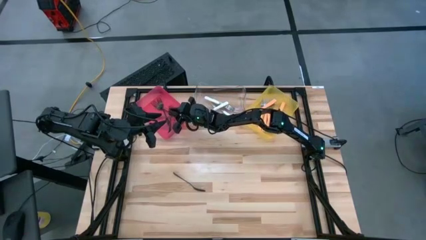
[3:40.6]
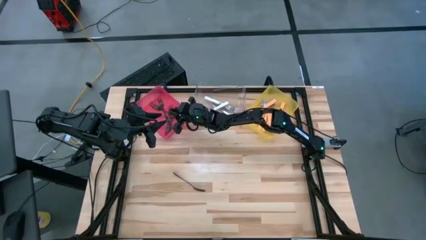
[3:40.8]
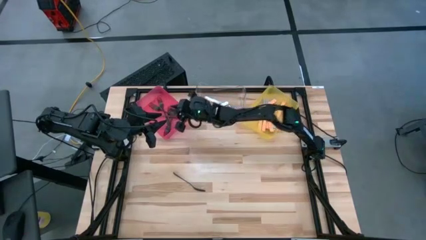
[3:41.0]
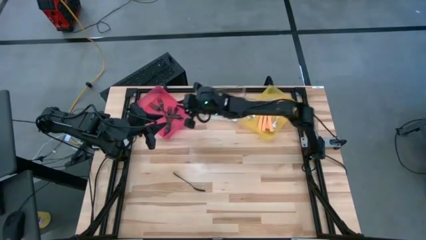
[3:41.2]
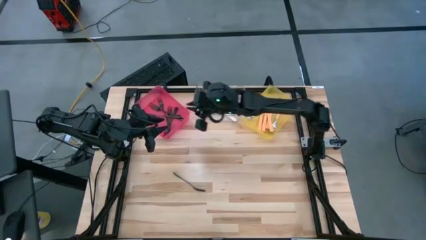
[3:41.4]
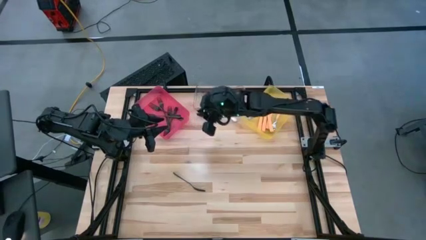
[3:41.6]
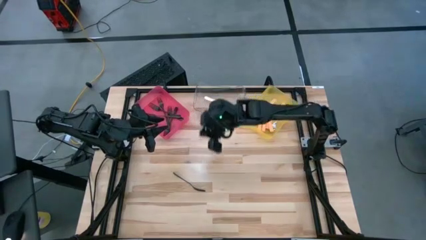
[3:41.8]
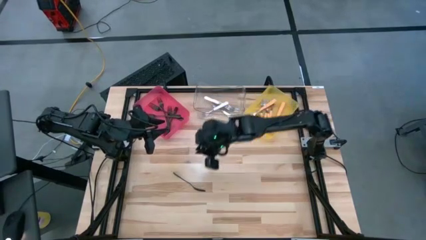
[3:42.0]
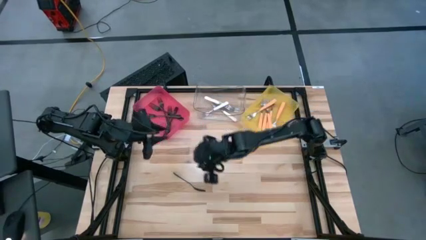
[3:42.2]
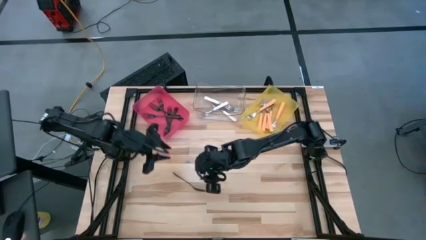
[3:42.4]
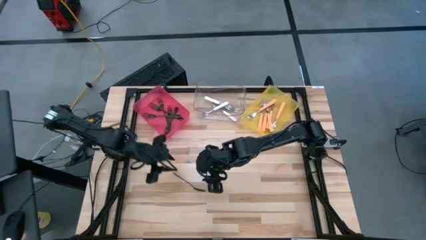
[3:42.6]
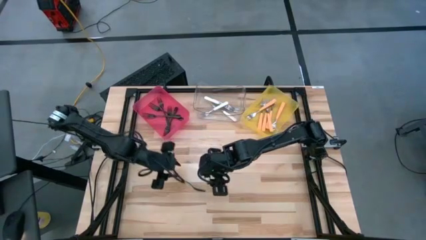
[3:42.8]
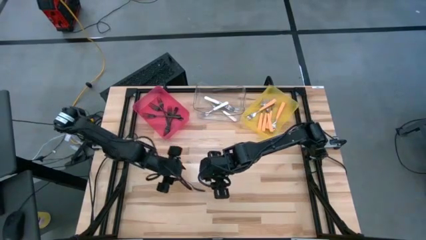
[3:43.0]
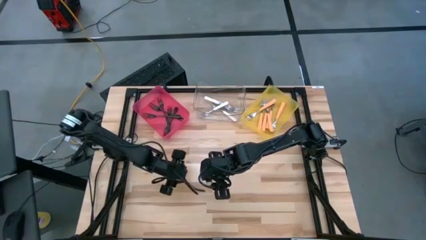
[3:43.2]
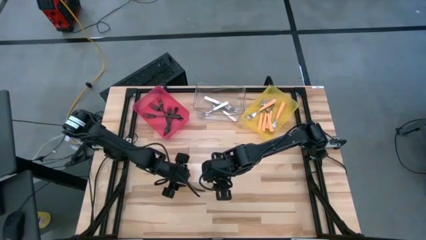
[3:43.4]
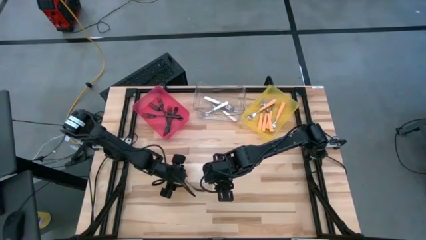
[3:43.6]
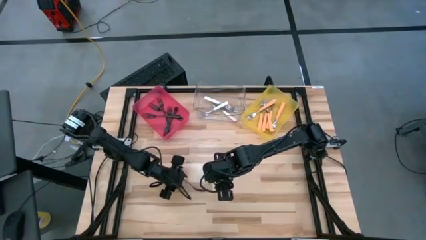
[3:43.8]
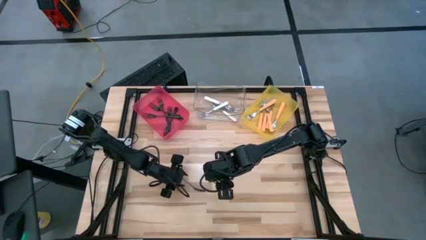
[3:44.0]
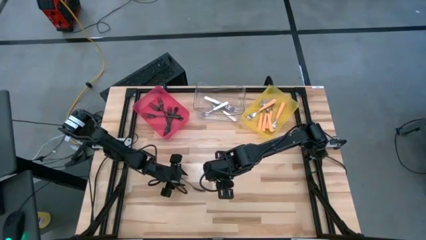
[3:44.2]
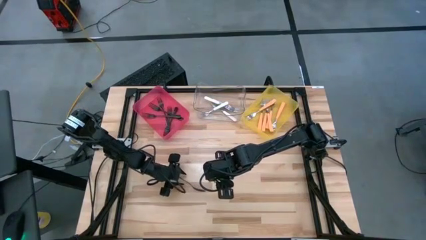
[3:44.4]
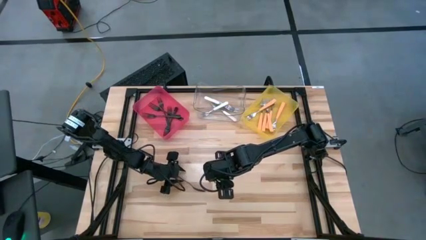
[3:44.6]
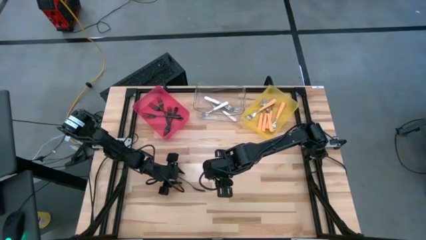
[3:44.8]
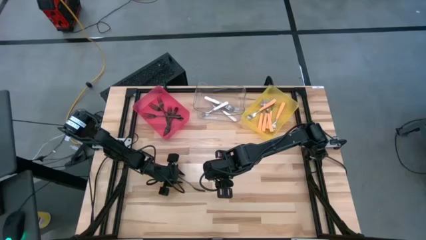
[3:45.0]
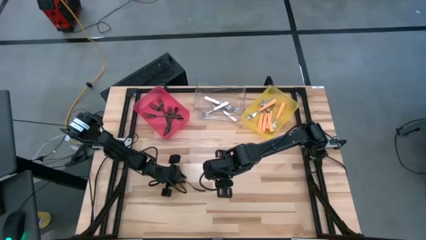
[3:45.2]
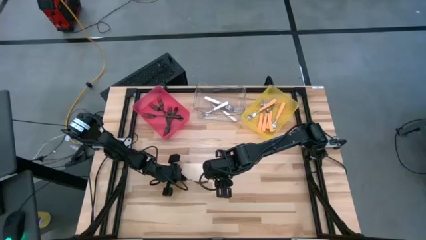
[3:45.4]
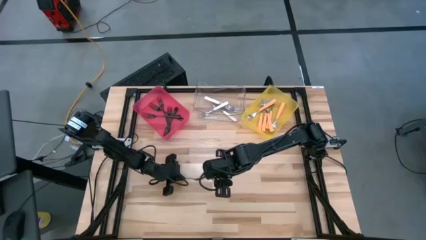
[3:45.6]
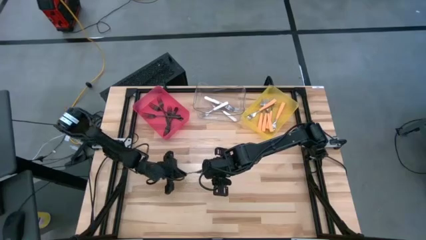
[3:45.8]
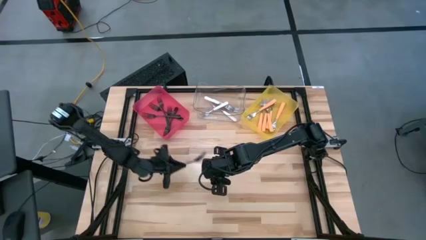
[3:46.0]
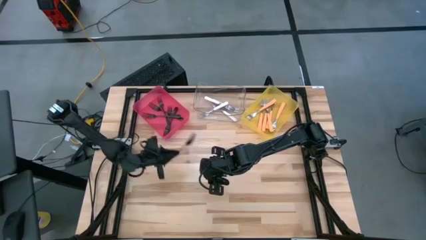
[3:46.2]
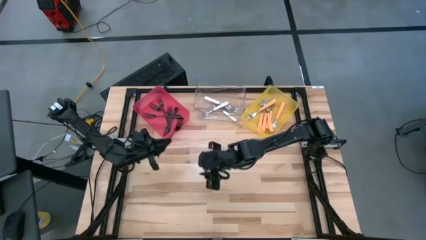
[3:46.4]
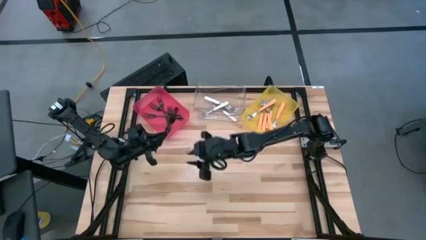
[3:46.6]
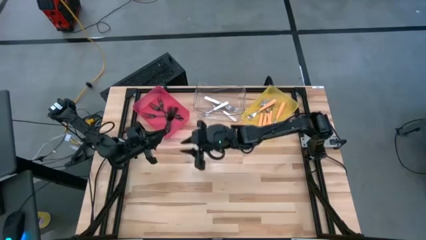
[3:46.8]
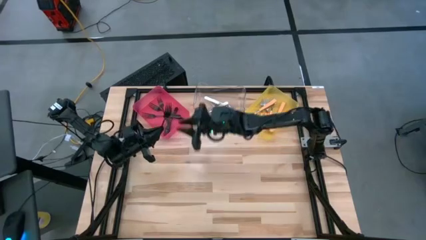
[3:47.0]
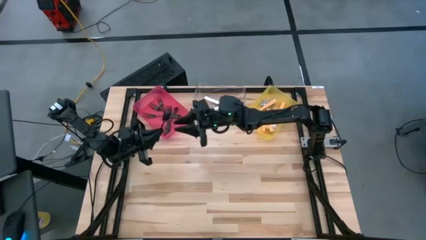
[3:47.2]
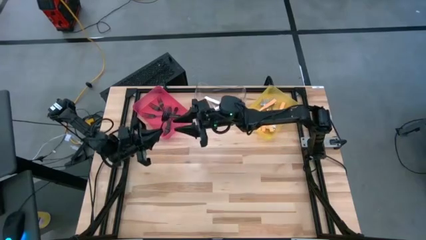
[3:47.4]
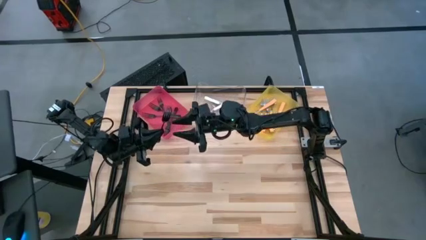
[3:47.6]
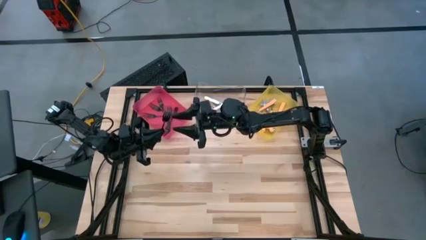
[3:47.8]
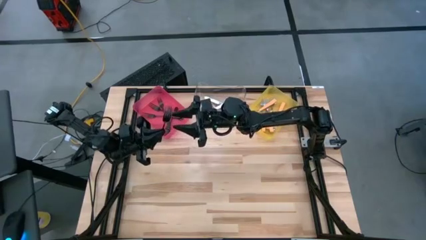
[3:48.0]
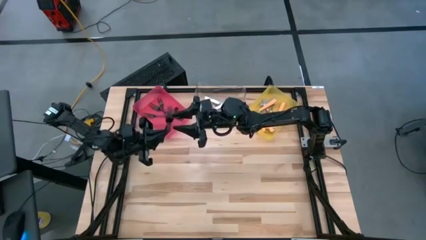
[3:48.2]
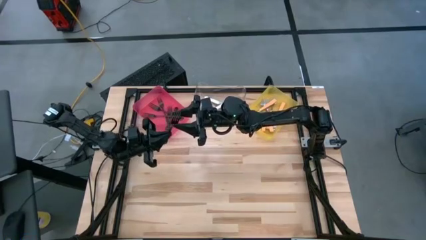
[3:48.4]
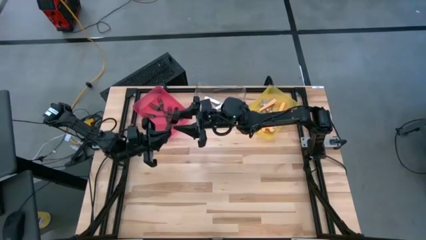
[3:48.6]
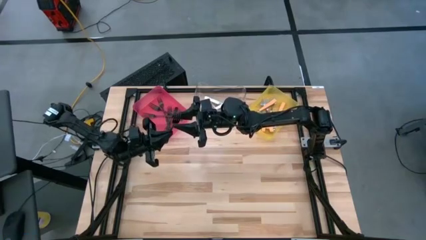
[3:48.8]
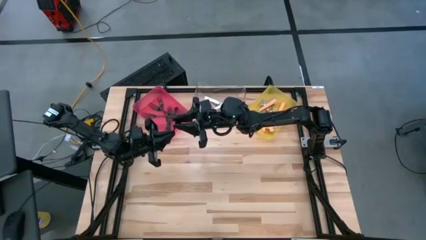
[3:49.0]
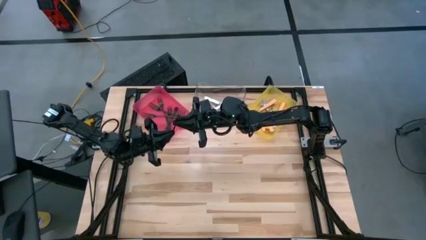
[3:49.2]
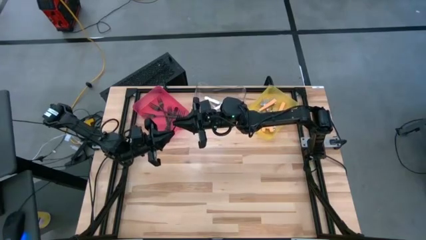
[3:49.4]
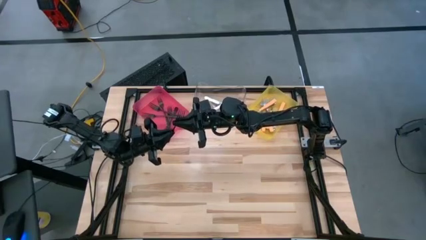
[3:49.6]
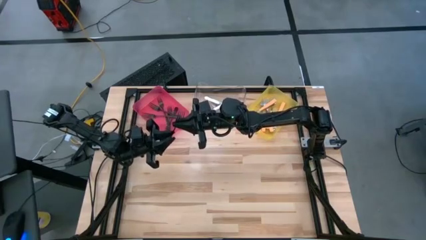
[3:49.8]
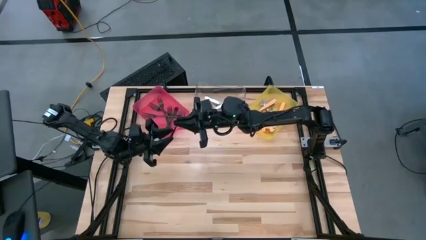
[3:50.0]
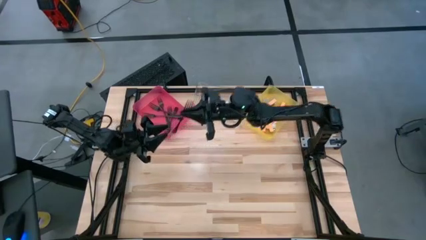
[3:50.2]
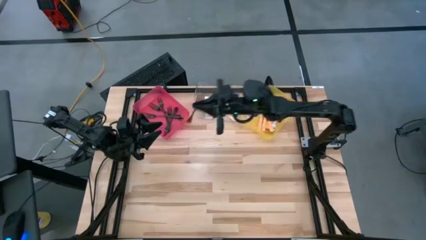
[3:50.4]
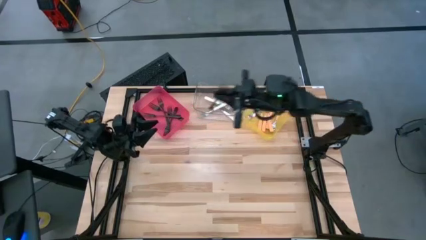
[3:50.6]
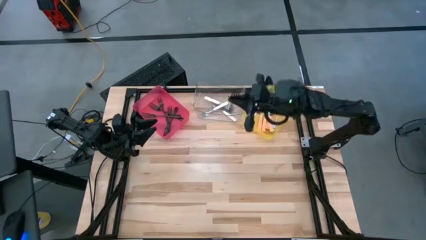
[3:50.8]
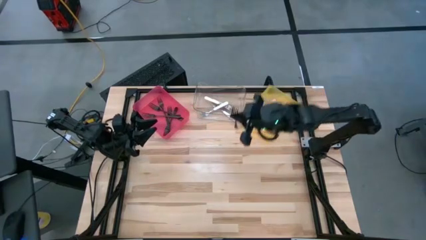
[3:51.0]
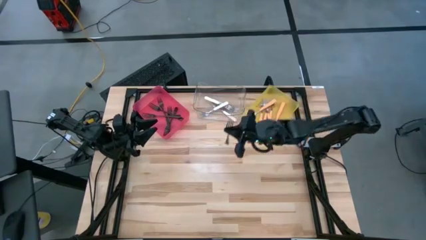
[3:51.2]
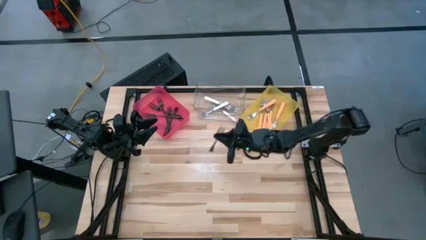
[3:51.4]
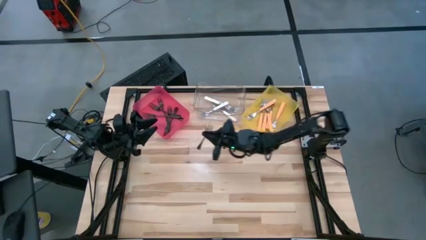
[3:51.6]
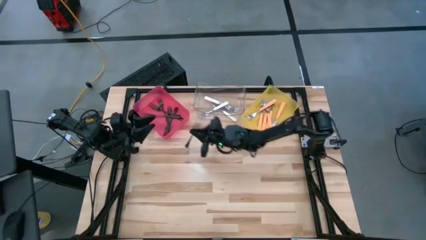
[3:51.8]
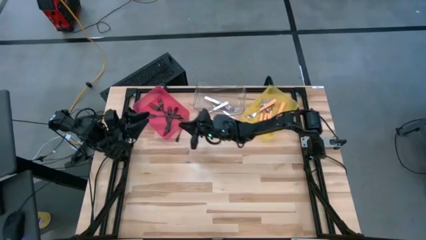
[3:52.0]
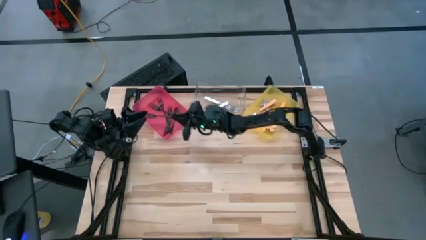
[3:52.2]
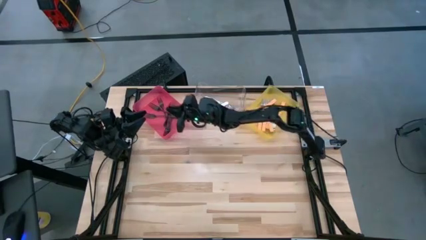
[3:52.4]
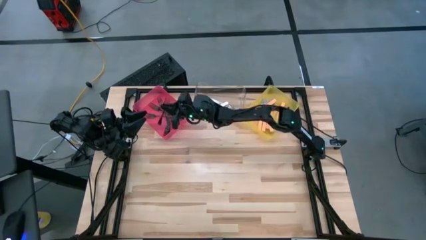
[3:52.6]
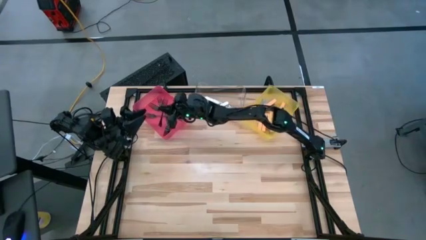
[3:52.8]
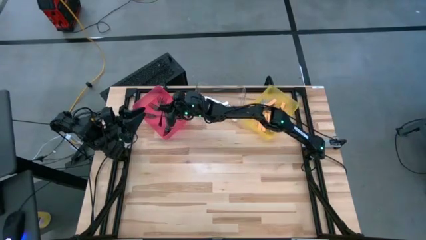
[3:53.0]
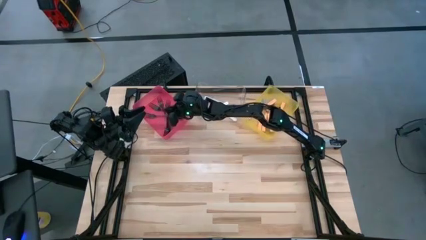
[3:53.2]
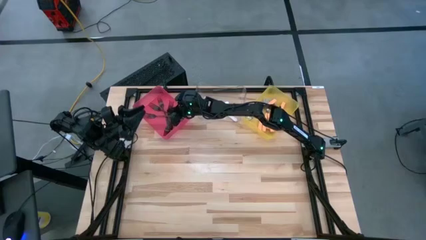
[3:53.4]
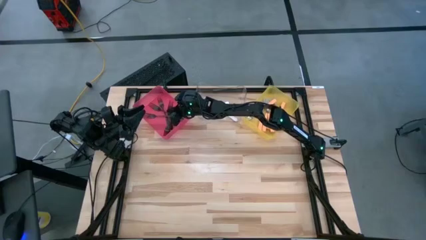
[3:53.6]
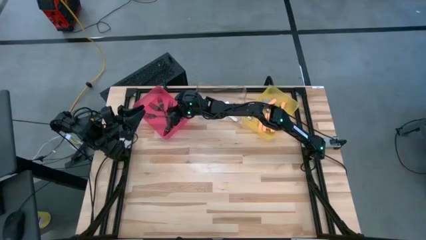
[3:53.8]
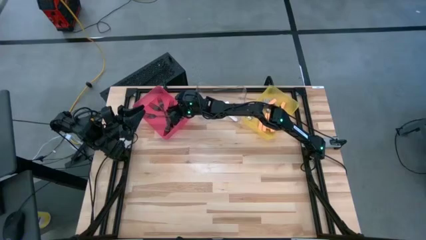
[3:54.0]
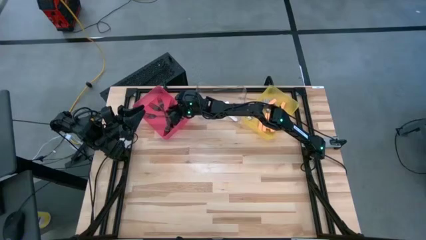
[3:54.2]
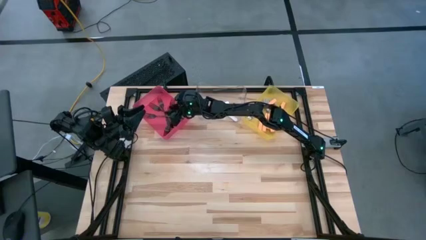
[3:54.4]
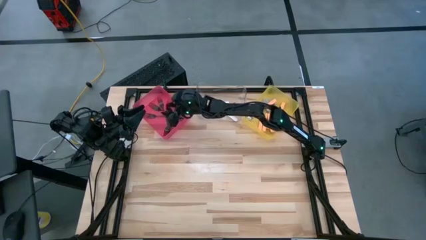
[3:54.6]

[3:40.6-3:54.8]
Task: Sort silverware by color (type)
Put the black fork into the pink bin
